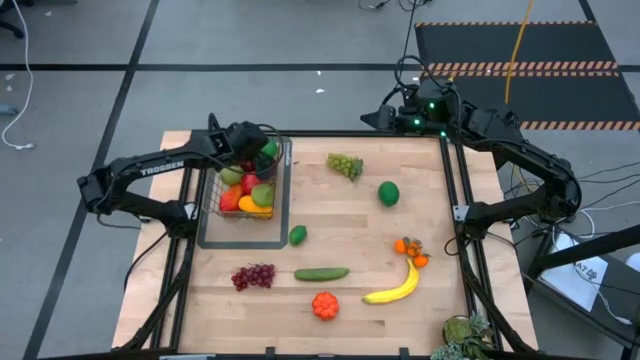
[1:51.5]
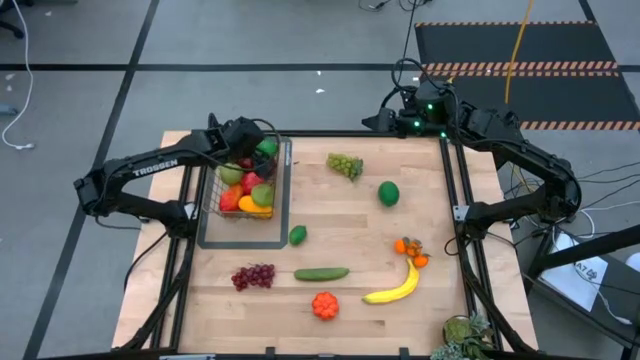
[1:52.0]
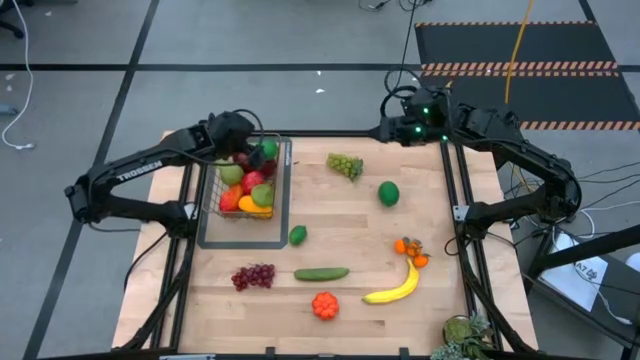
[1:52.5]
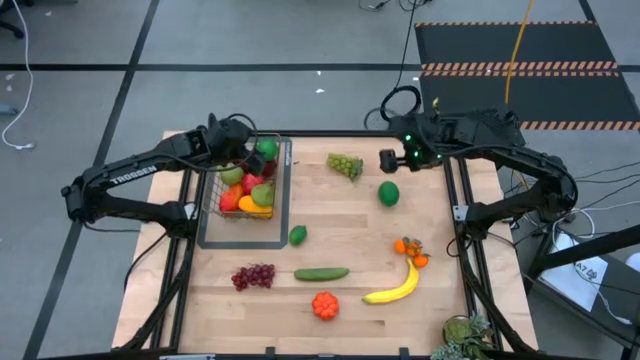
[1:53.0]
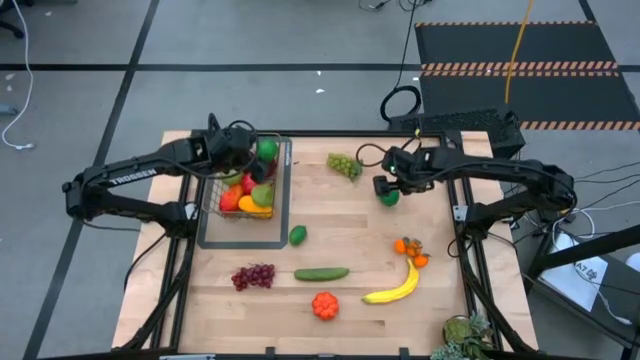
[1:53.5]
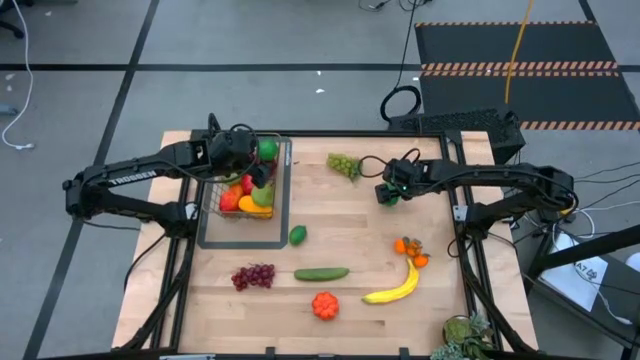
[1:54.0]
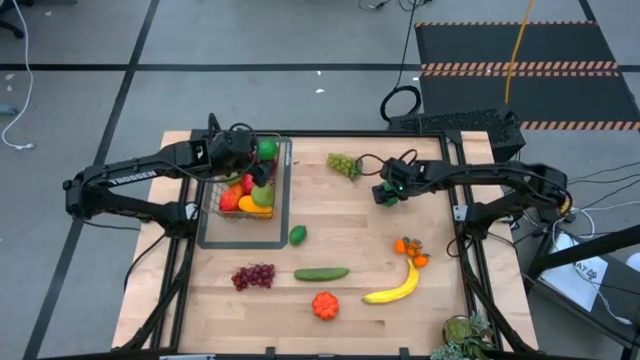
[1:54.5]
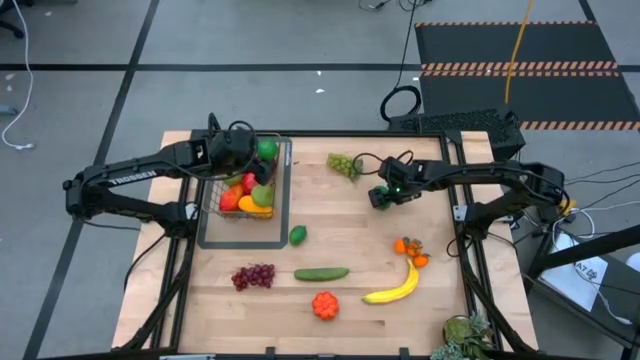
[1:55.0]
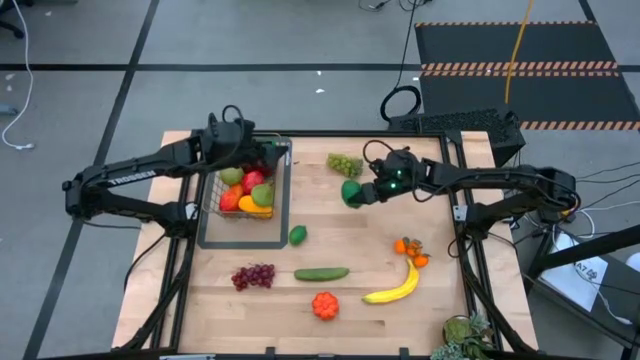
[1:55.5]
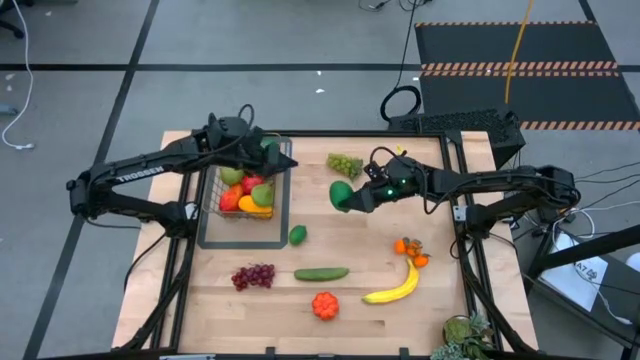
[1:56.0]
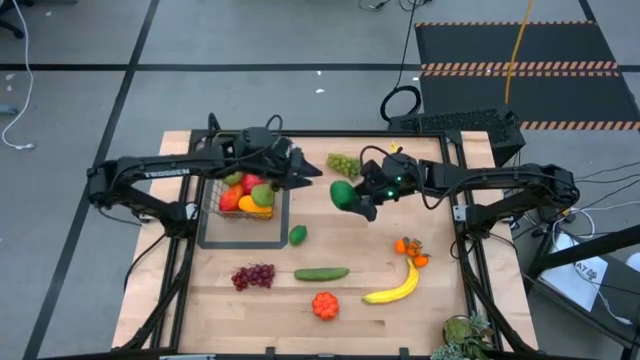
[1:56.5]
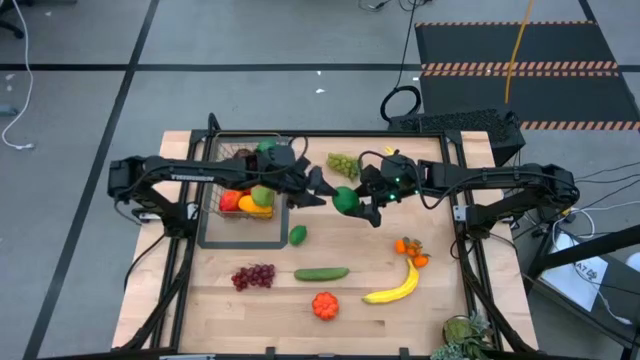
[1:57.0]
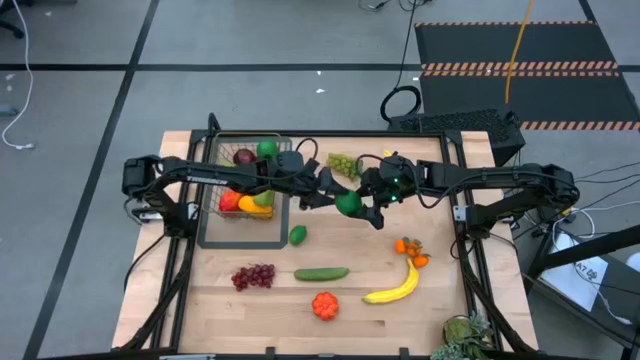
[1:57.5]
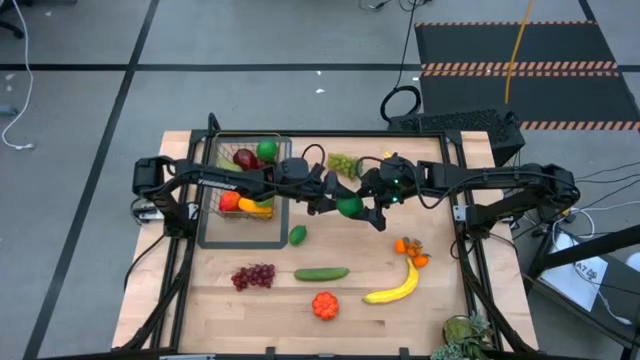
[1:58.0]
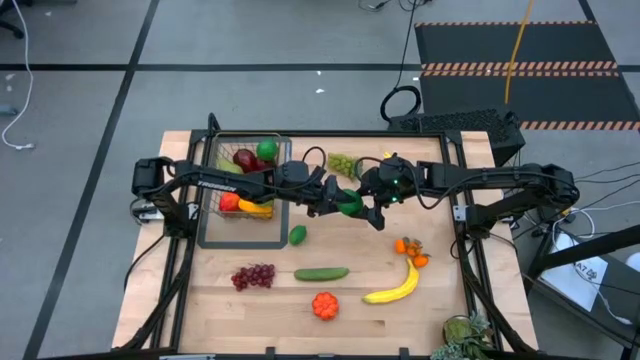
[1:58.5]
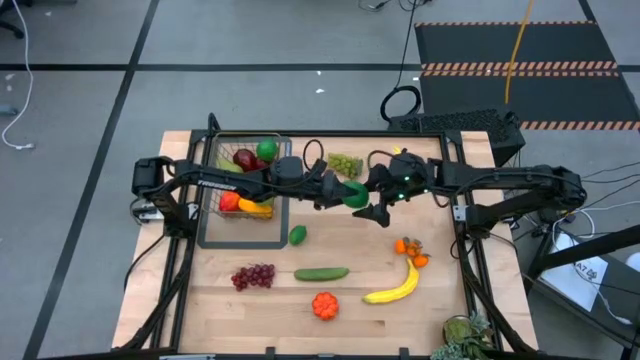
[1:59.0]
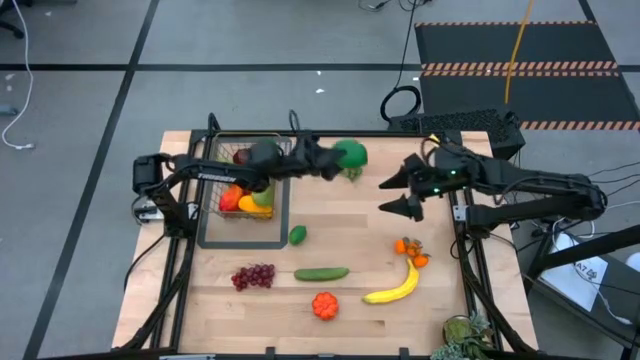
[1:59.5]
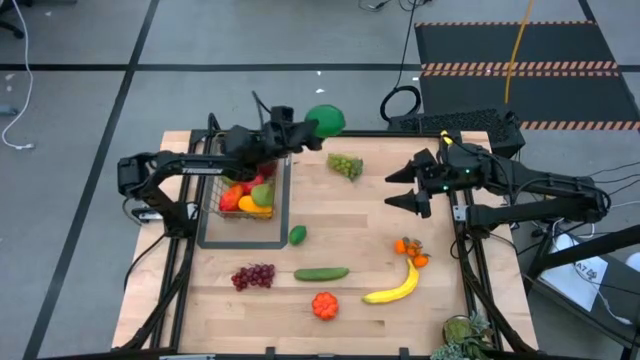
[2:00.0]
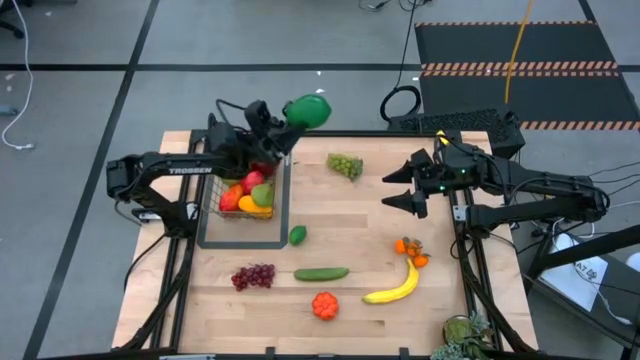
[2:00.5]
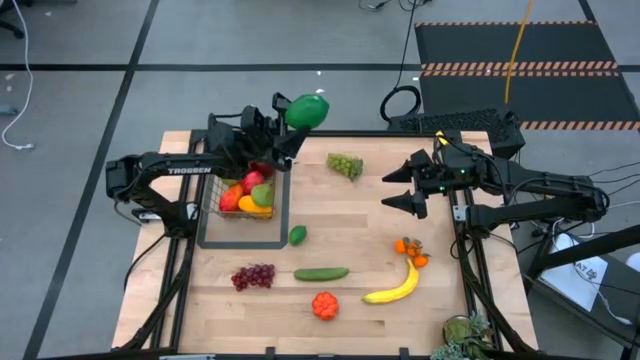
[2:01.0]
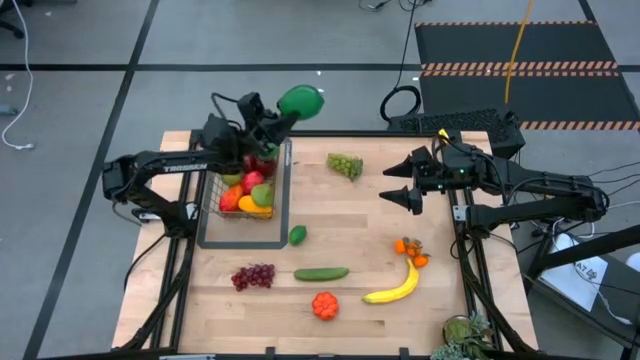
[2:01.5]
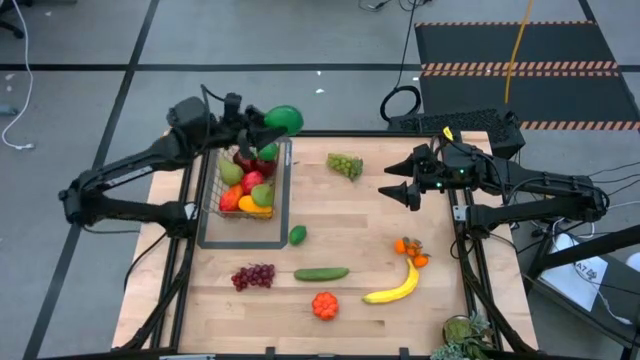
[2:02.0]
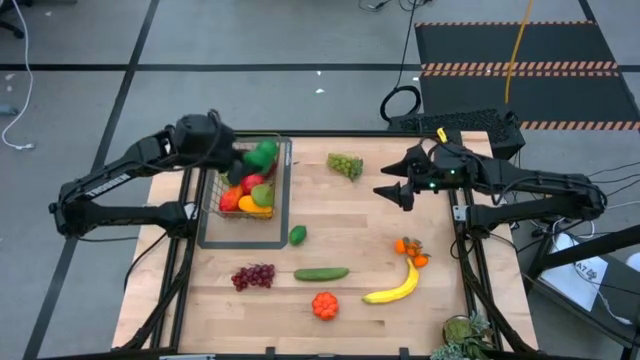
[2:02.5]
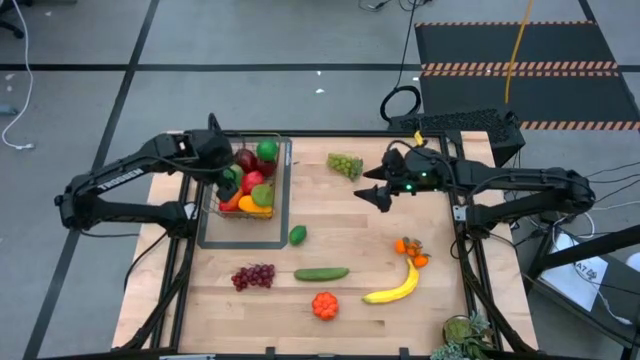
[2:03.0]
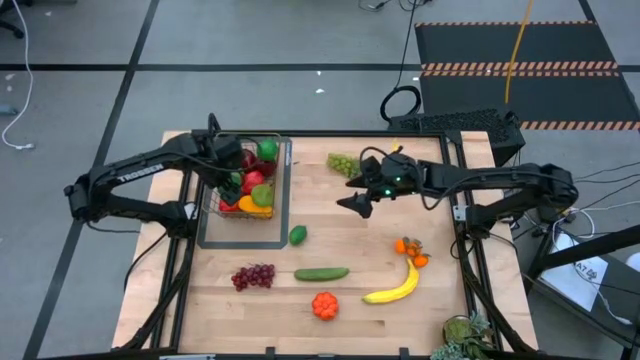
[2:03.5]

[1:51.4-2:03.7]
Task: Build produce basket
Put the top lime into the wire basket

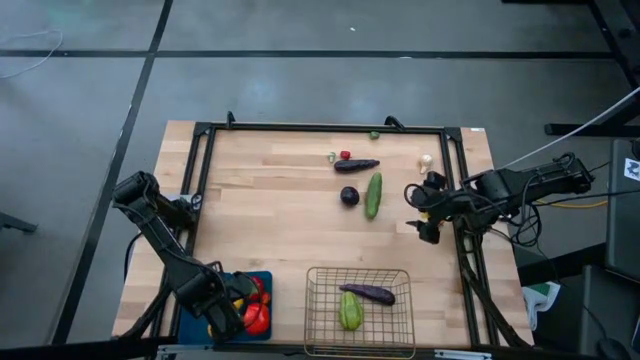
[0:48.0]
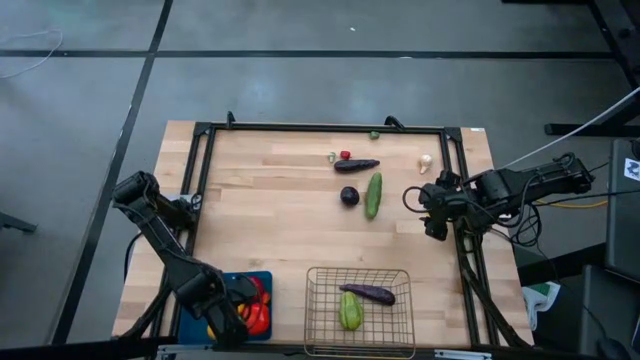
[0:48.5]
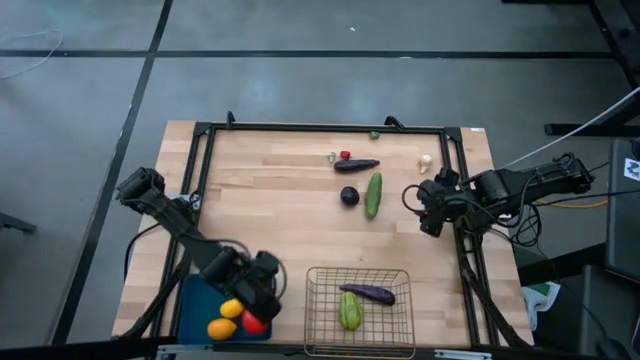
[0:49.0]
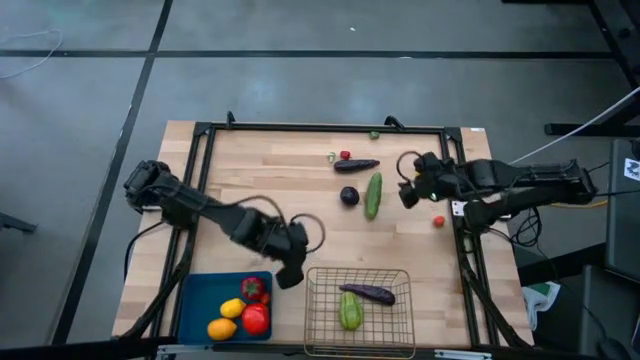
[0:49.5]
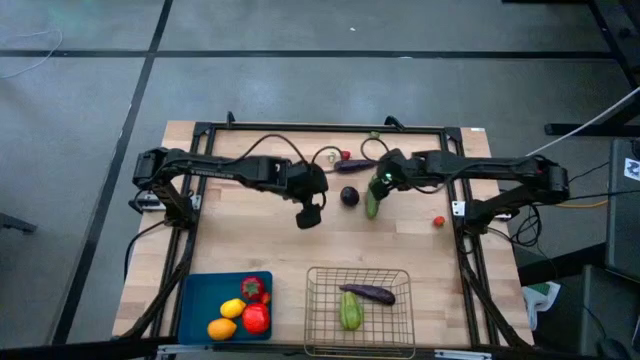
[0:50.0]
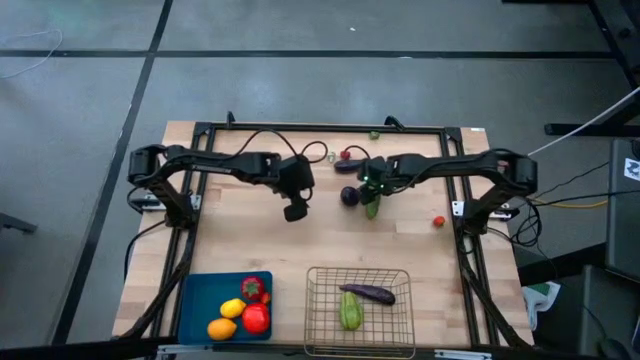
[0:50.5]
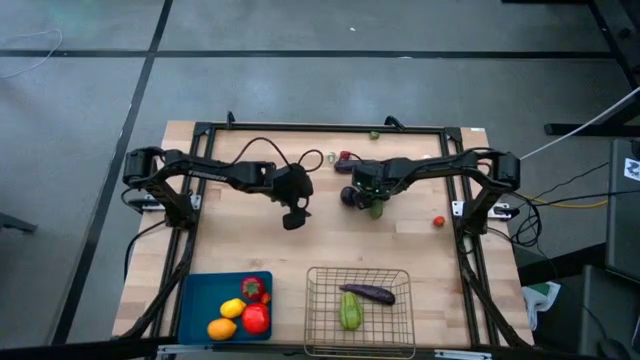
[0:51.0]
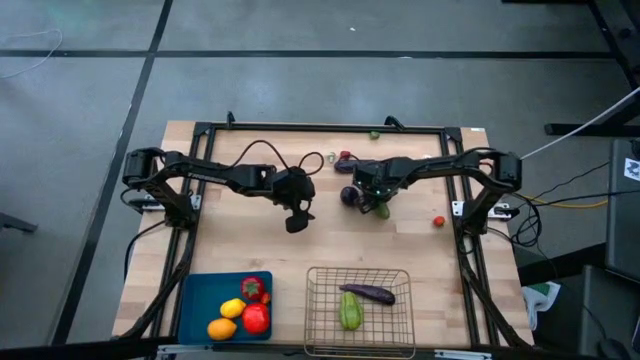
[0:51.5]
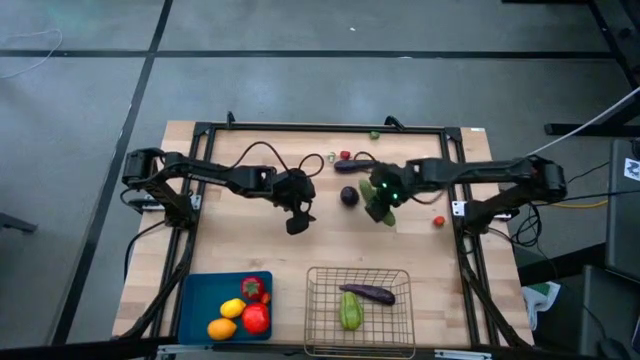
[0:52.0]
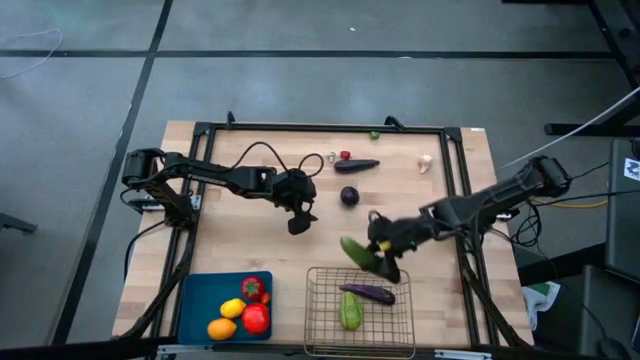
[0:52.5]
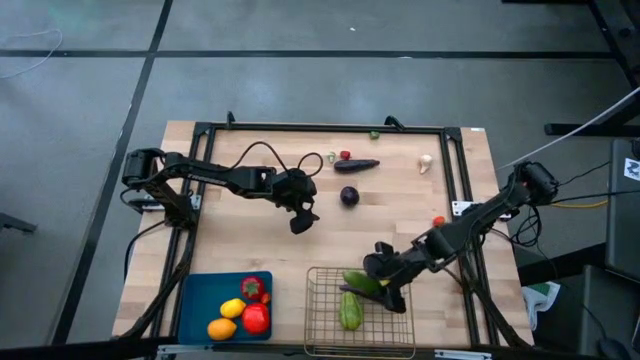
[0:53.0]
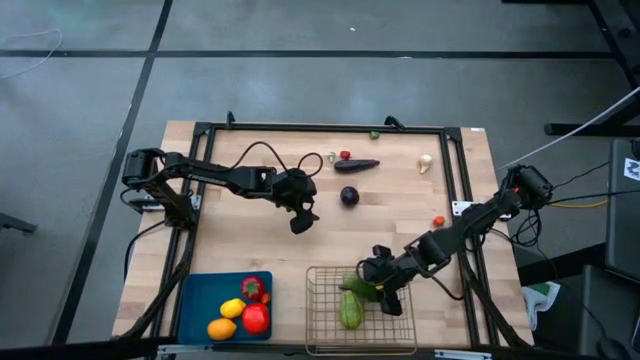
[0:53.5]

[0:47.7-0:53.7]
Task: Sort produce into baskets
Put the cucumber into the gold wire basket
